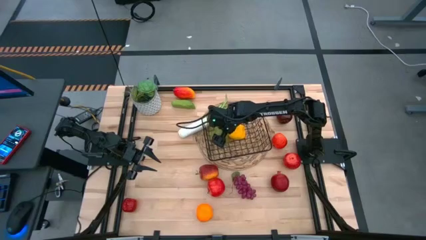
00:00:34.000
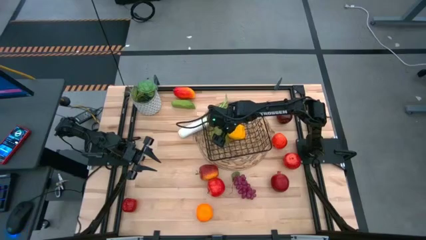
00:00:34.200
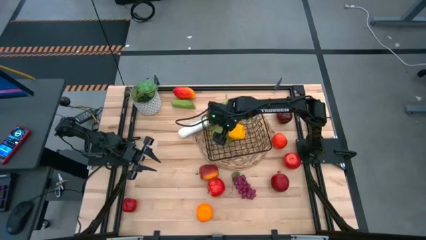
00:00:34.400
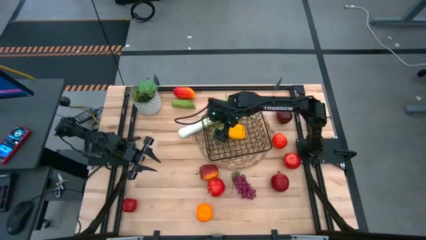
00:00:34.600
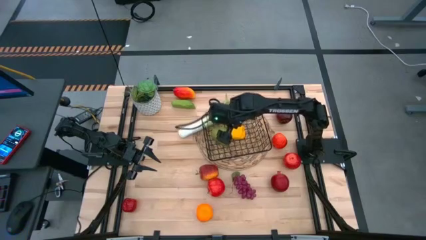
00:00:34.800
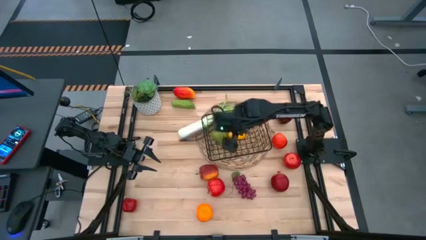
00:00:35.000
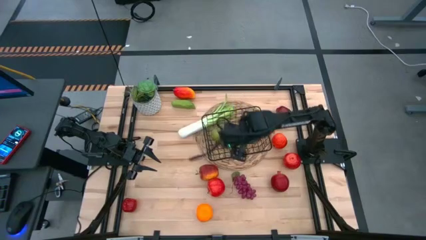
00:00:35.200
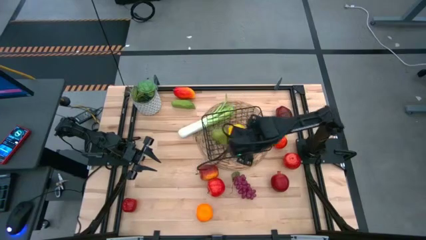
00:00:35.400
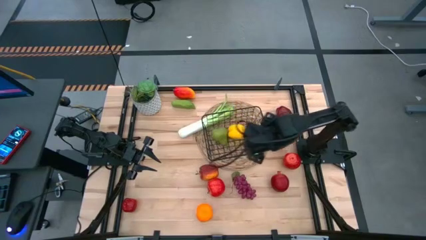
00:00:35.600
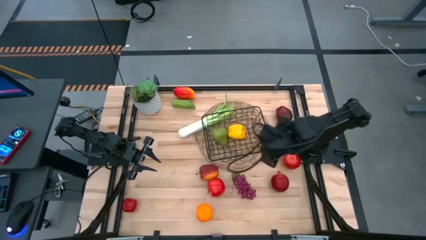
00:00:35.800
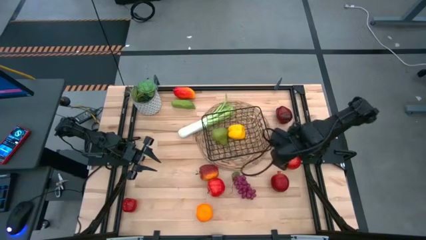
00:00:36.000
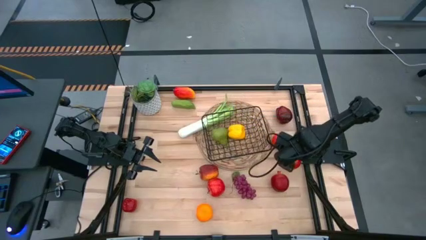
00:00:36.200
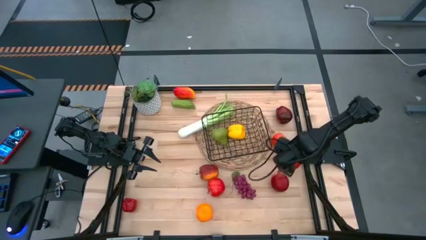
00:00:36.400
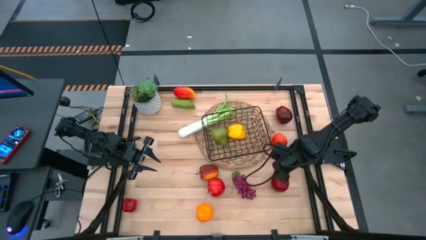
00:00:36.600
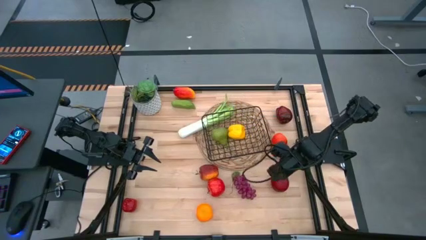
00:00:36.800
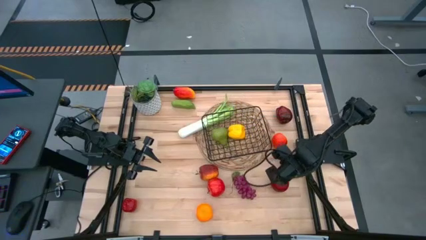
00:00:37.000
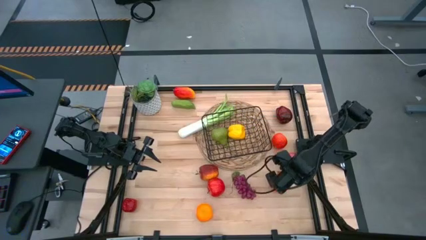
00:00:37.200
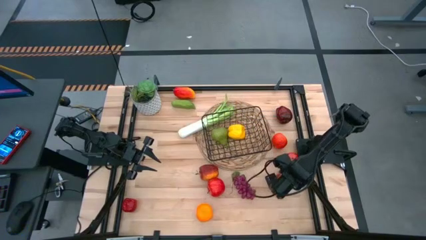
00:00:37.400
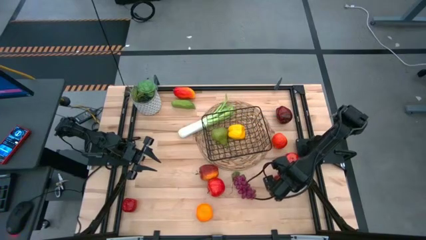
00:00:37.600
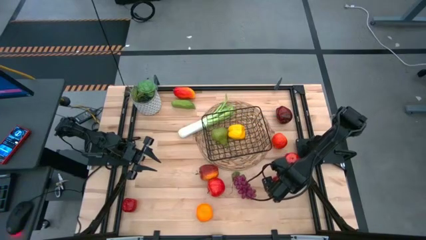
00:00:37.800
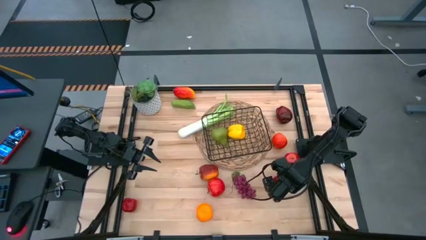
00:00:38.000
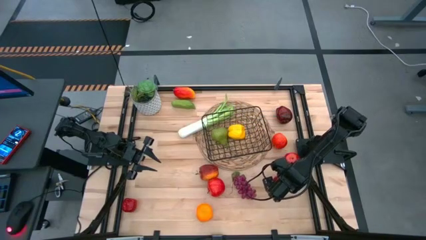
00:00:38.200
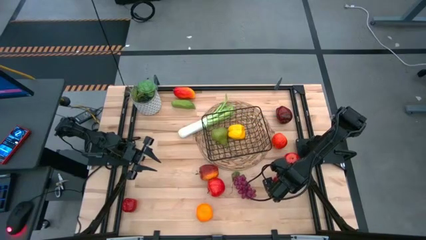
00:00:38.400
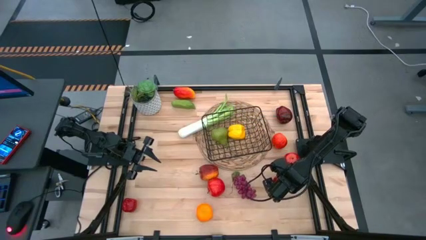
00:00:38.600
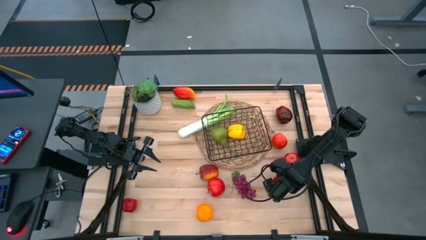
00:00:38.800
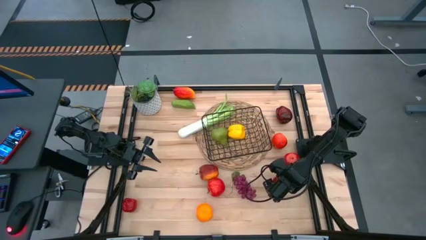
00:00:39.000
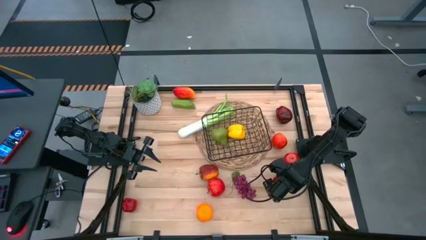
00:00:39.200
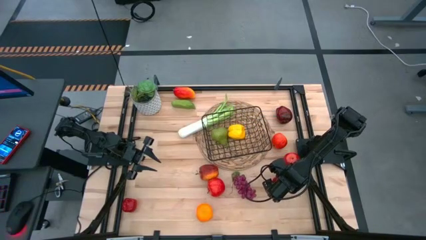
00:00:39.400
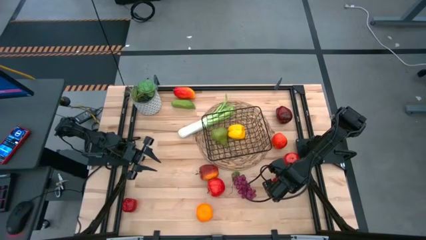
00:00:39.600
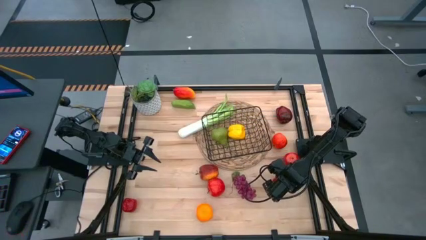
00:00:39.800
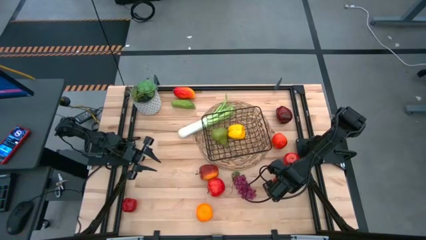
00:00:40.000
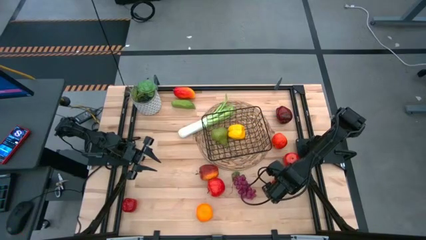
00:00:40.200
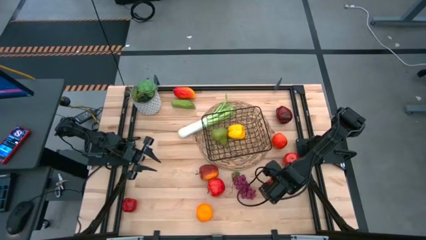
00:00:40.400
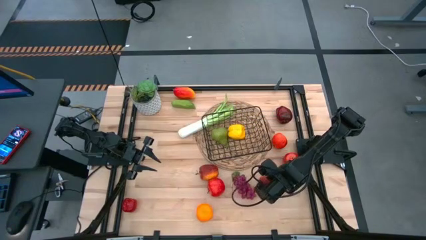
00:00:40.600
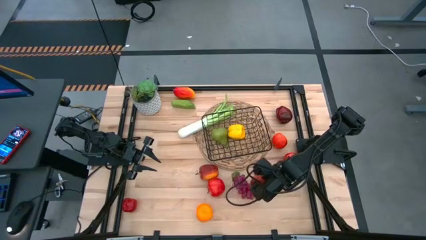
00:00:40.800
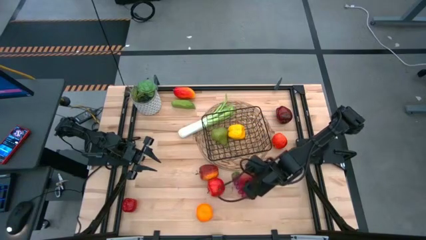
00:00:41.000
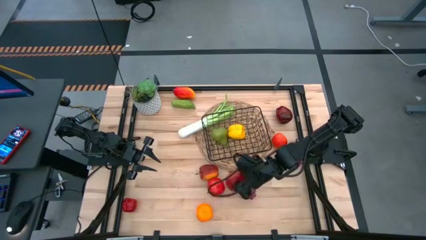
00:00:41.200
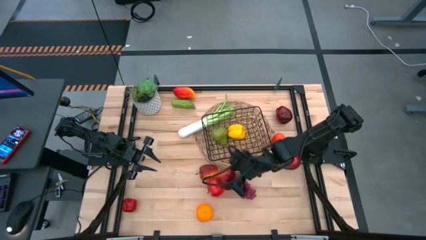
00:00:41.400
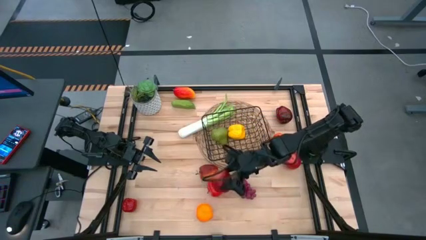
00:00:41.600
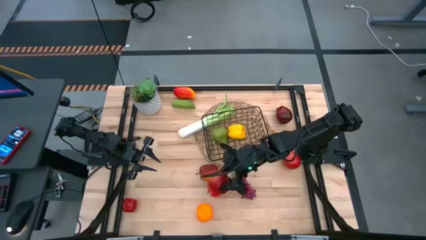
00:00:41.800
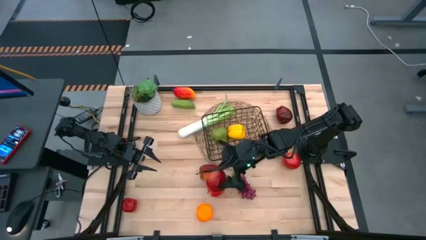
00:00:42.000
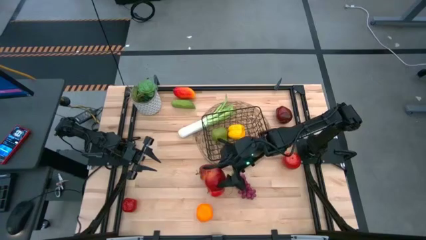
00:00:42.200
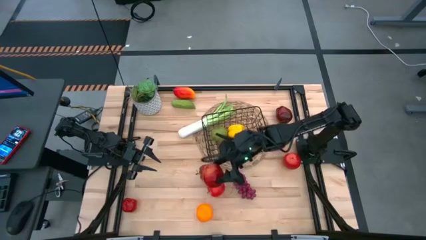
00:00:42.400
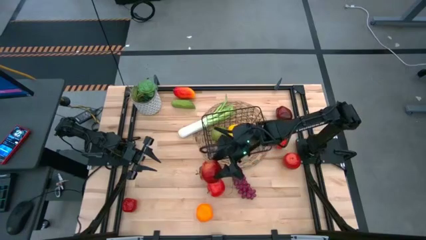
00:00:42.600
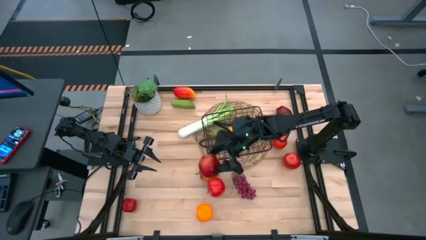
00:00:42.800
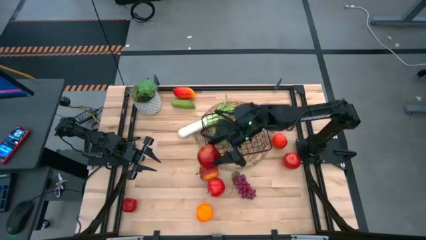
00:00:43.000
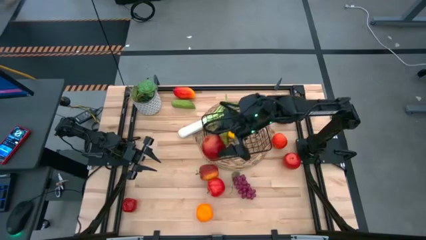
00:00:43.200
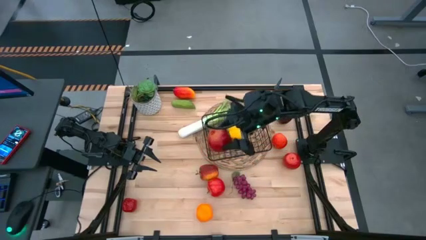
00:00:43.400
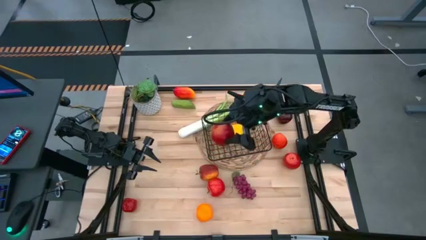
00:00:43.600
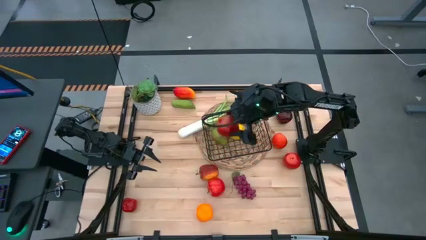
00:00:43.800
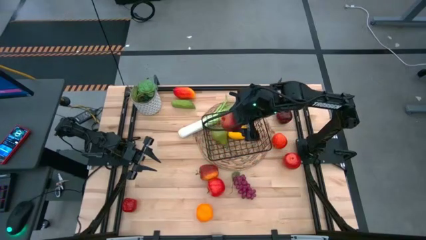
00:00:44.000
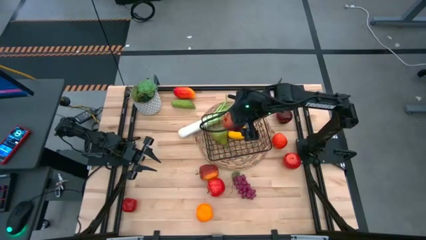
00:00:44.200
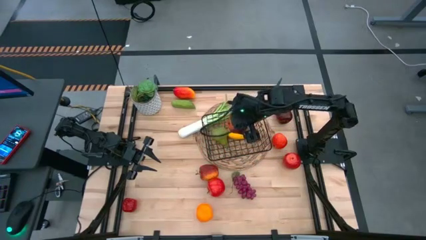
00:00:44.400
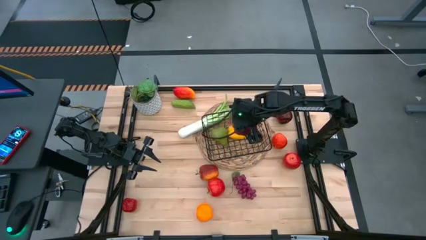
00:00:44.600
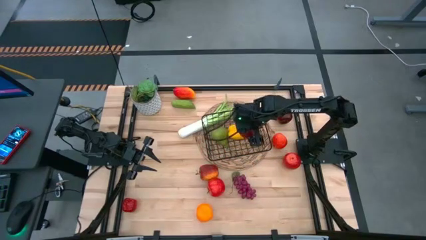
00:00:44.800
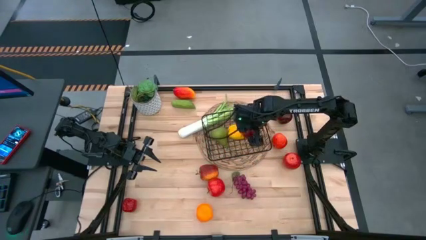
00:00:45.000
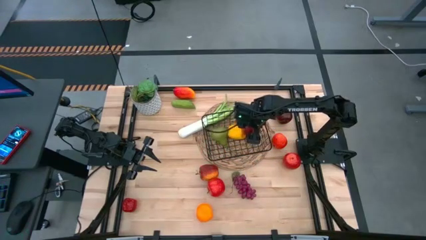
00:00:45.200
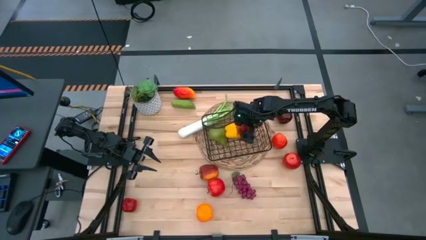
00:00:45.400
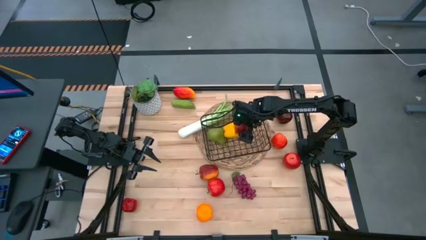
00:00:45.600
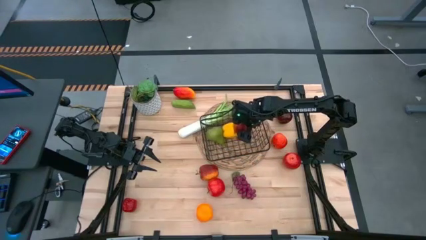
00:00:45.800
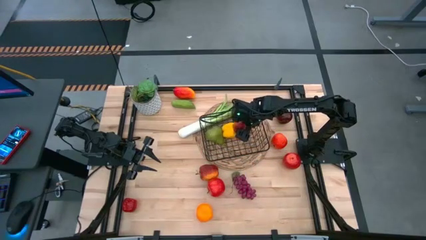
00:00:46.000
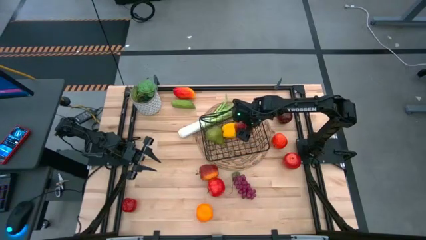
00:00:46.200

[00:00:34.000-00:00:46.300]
Task: Build produce basket
Put the pomegranate into the wire basket

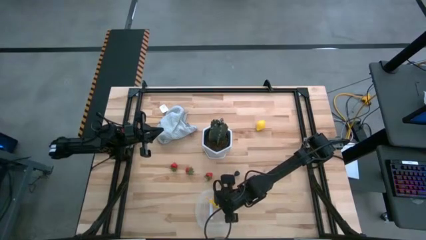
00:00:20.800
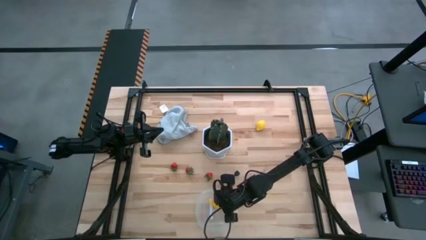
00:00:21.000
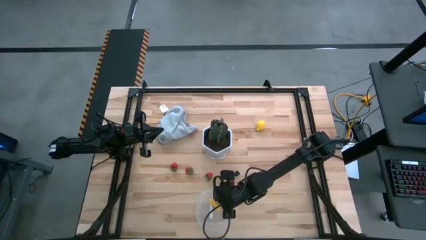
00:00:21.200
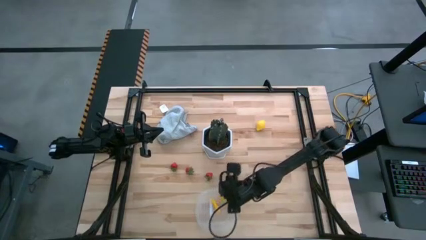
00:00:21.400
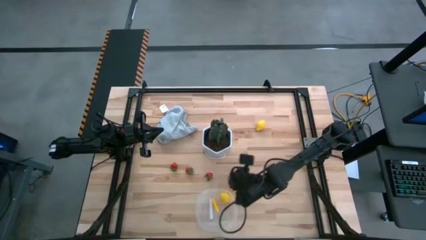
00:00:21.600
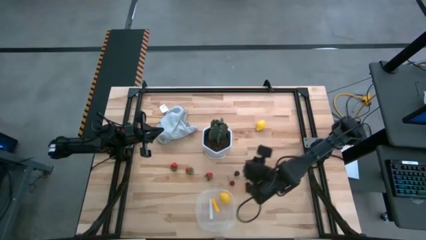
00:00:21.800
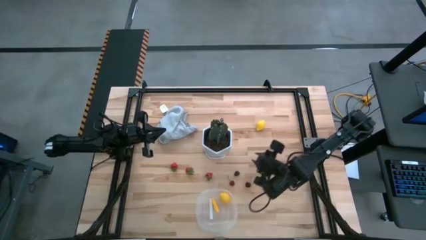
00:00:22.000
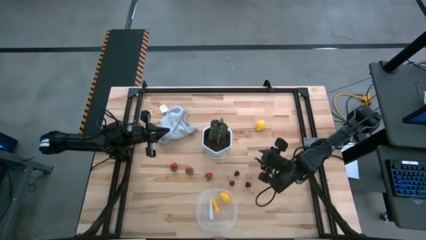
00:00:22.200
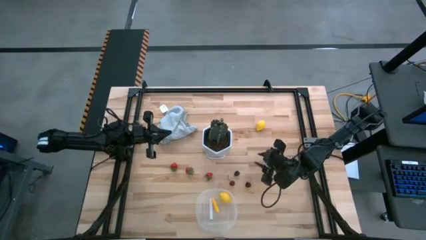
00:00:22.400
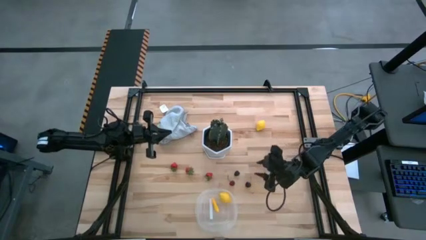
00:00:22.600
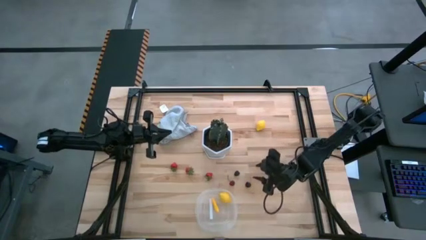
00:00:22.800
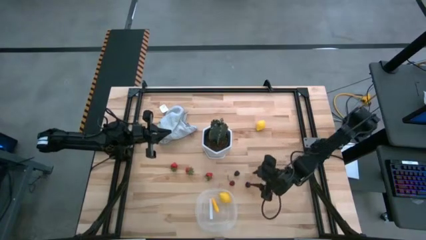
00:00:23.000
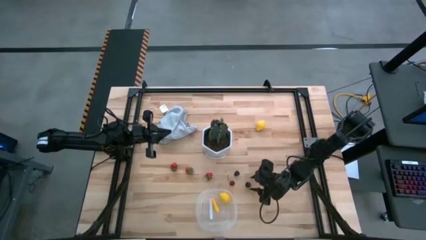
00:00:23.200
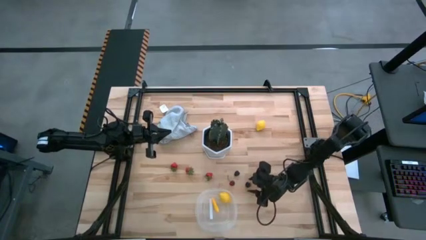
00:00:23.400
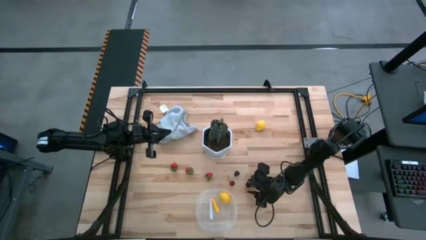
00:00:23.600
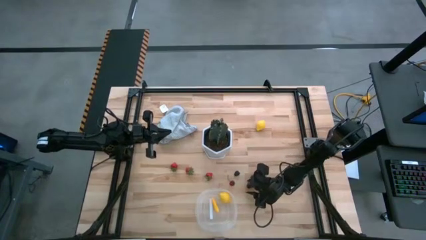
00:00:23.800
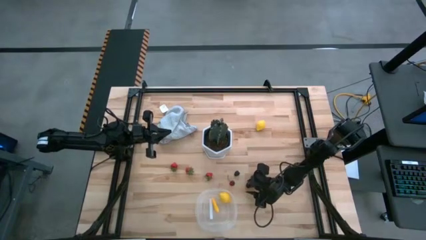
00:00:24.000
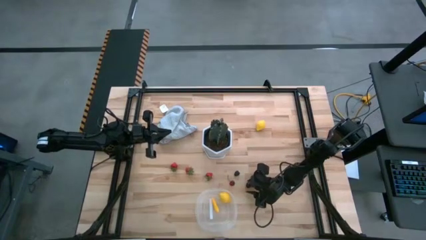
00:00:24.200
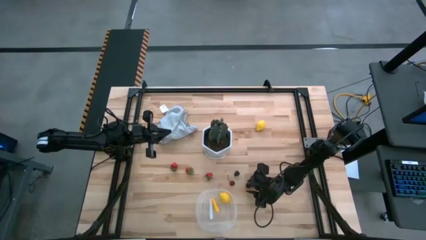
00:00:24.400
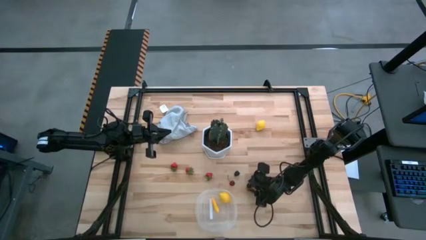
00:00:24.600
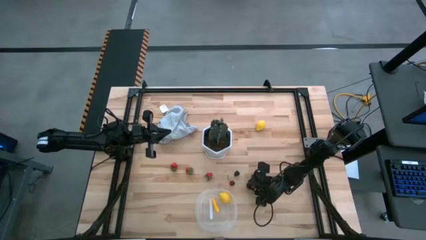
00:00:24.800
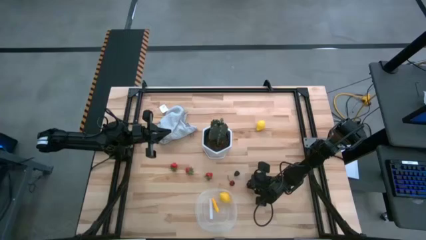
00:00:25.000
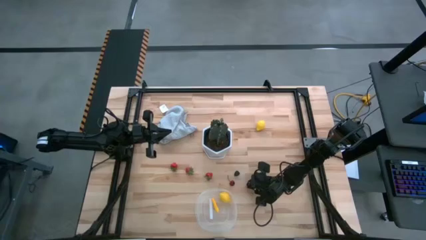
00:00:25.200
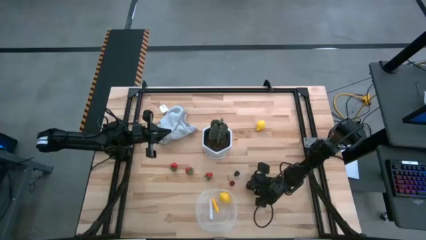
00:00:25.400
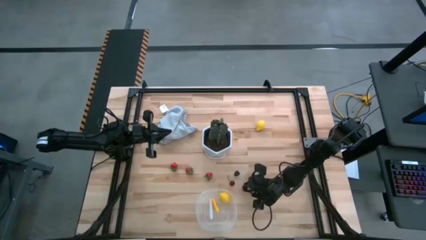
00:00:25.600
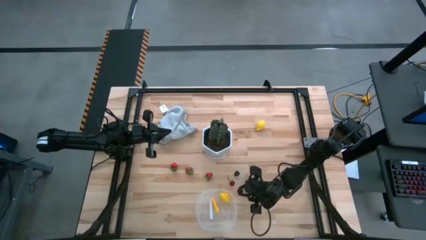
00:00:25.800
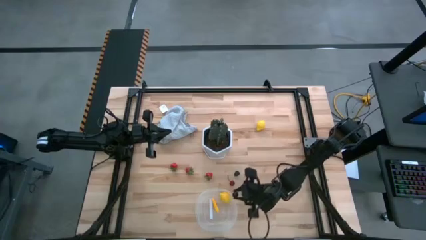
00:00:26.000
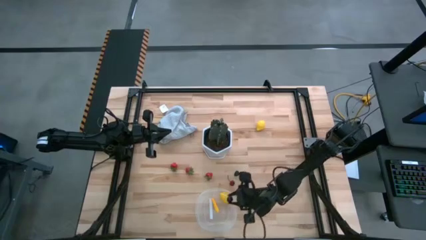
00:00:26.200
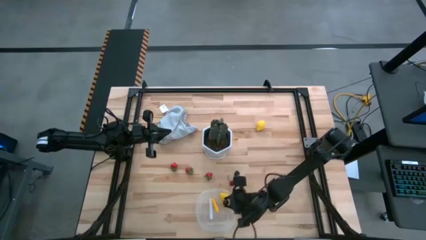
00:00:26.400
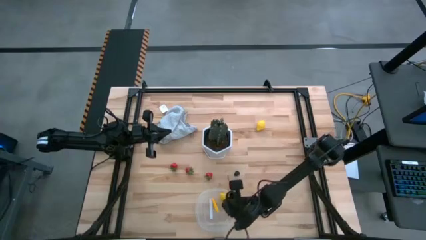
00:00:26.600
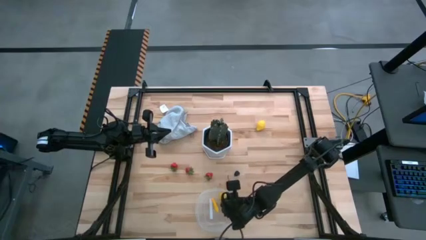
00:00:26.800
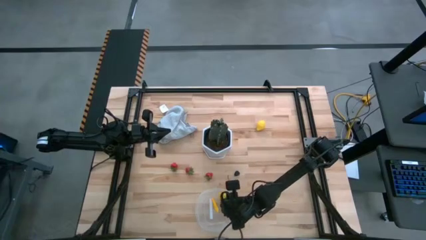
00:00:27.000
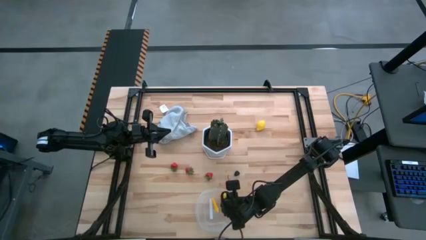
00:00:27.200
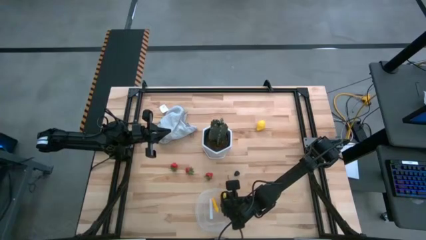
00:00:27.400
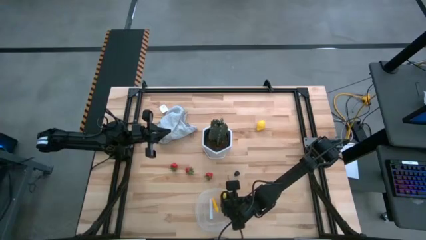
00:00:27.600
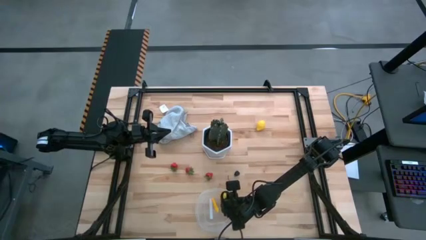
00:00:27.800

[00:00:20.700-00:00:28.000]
Task: Pick and placing Produce into tupperware
Put the black cherry into the transparent bin
